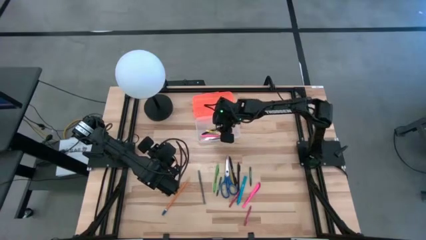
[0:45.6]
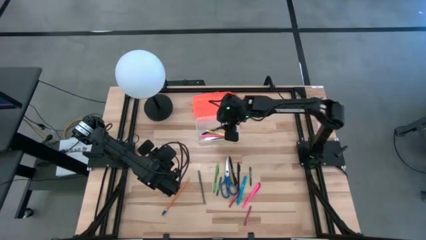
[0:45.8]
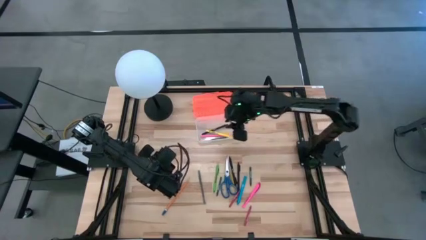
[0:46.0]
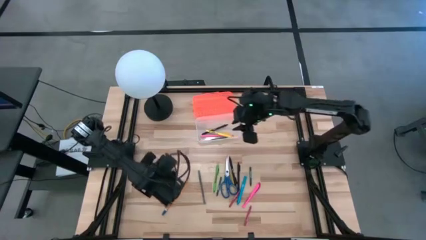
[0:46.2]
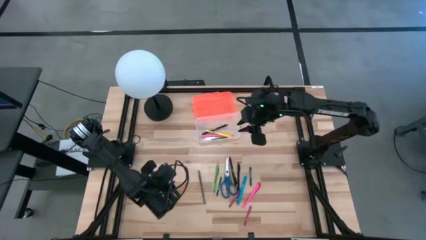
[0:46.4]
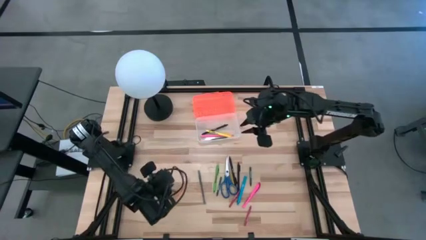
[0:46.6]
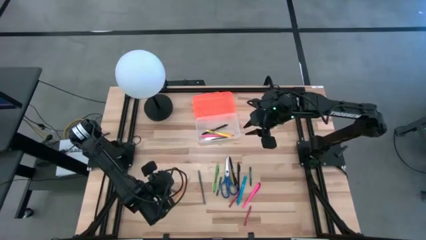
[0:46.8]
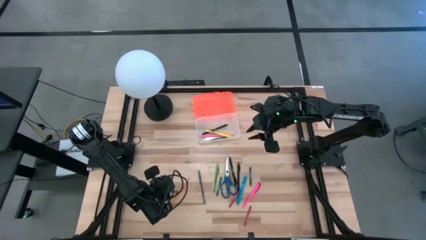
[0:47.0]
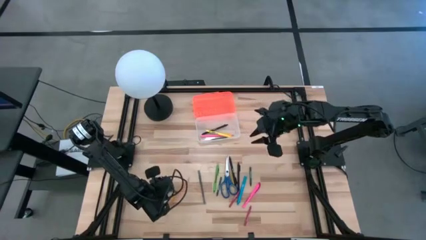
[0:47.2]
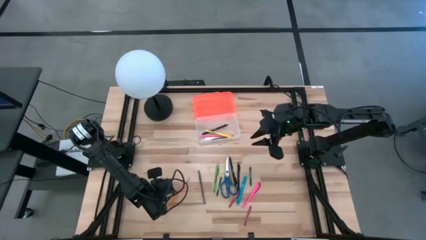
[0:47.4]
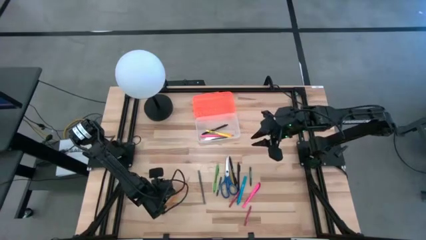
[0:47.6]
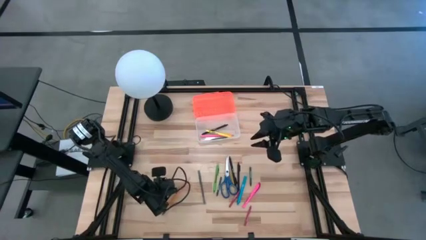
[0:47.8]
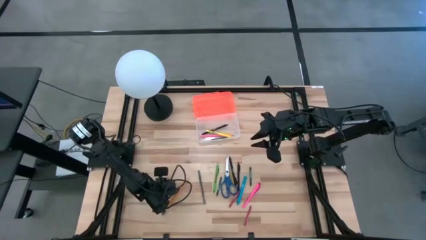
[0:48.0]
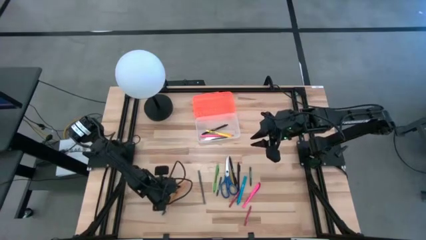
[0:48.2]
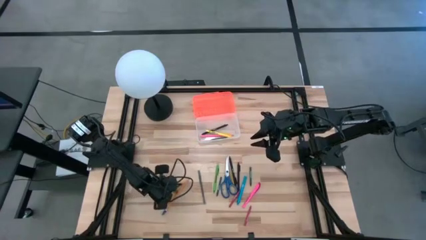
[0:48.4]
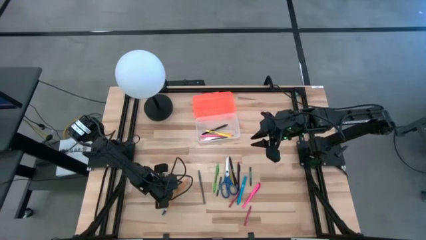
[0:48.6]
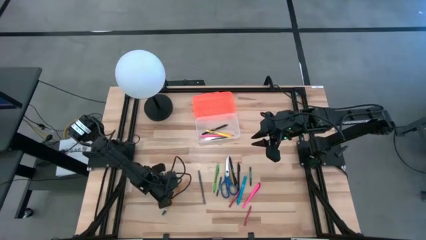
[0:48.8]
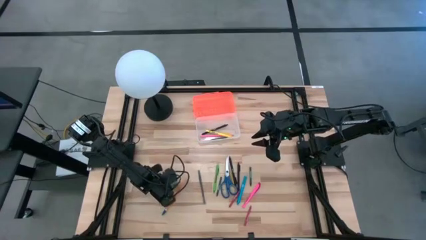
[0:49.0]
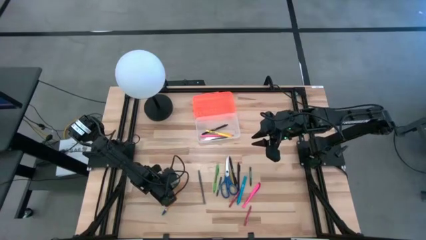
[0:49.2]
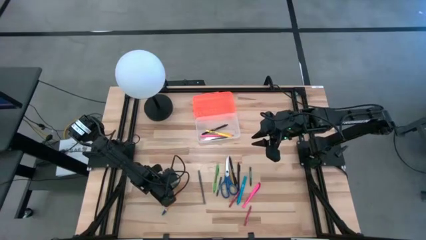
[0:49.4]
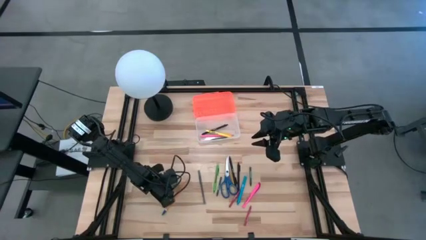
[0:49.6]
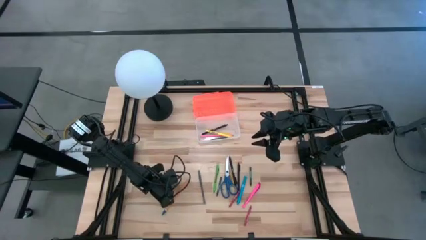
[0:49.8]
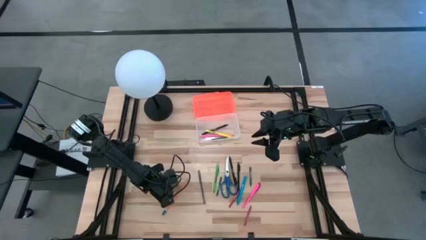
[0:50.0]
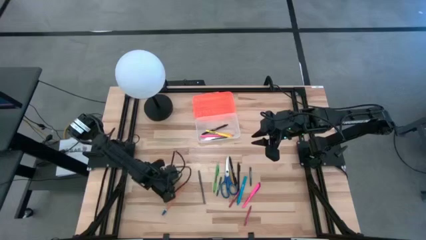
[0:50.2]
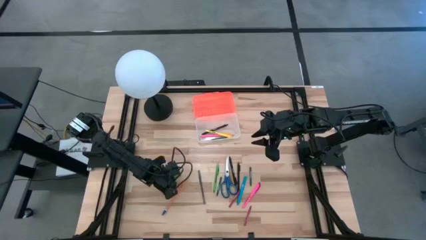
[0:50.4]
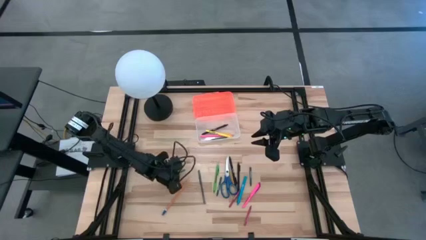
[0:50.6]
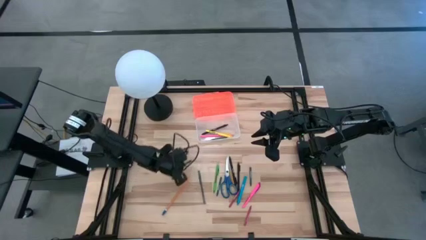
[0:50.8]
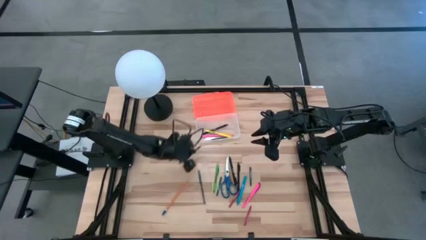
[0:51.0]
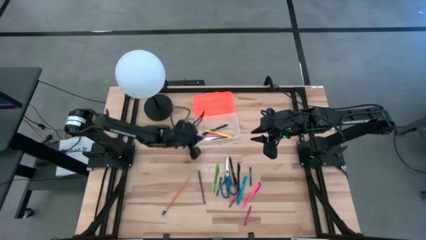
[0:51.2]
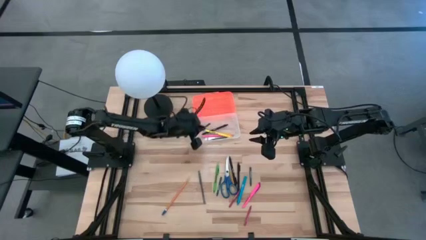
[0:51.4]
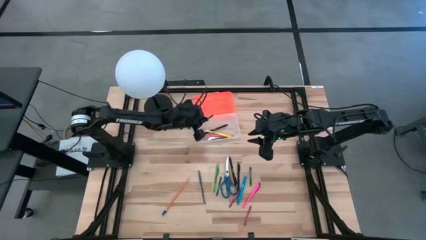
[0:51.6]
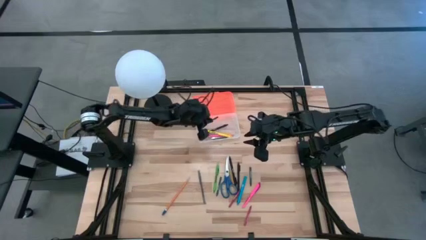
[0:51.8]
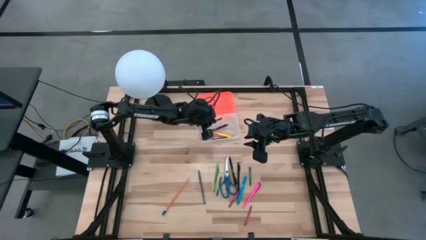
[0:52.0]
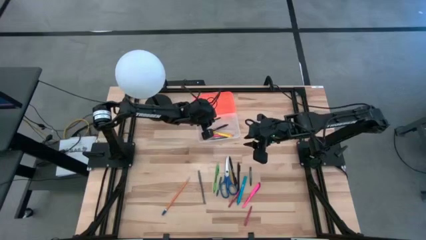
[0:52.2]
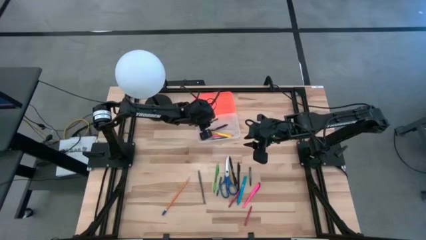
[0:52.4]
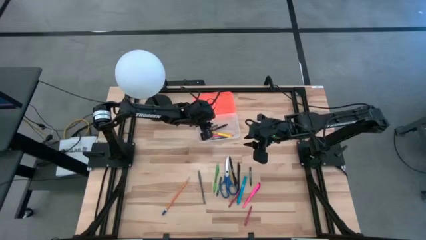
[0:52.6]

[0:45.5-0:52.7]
Task: Pick & place school supplies into a supply box
Put the green crayon into the supply box

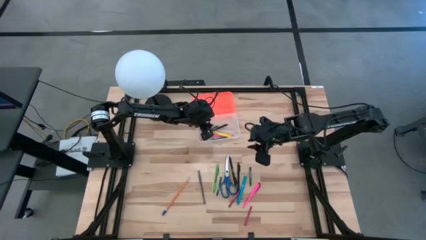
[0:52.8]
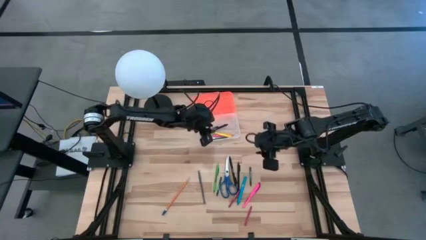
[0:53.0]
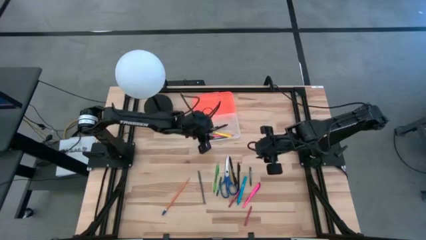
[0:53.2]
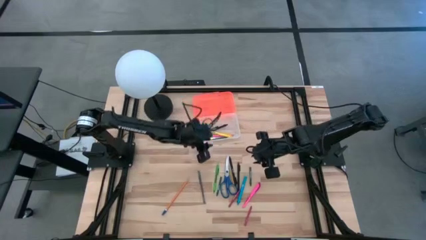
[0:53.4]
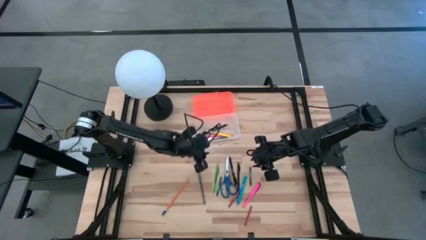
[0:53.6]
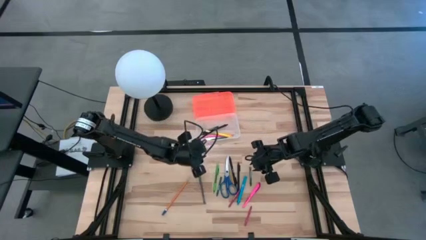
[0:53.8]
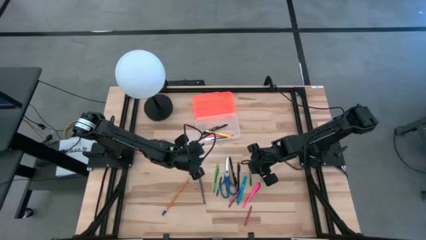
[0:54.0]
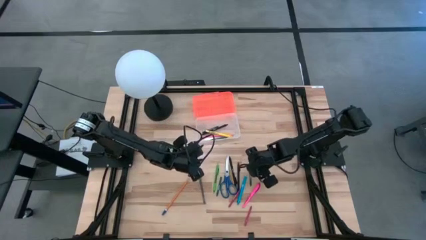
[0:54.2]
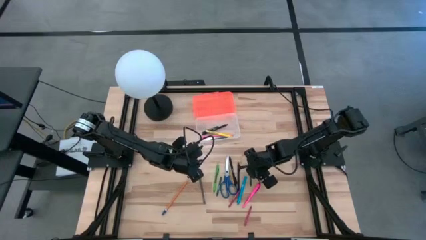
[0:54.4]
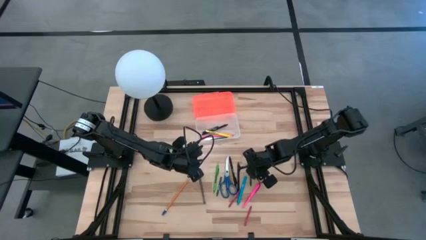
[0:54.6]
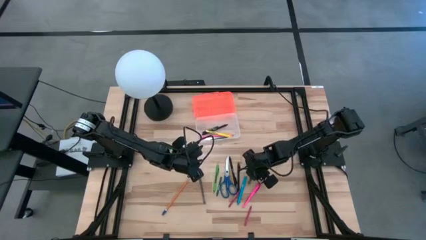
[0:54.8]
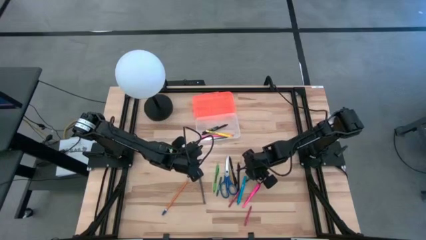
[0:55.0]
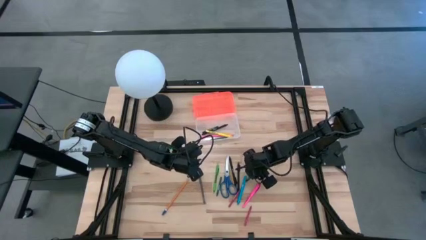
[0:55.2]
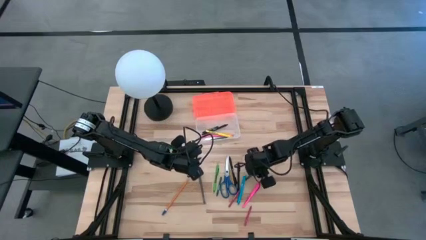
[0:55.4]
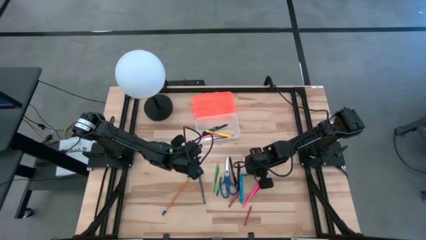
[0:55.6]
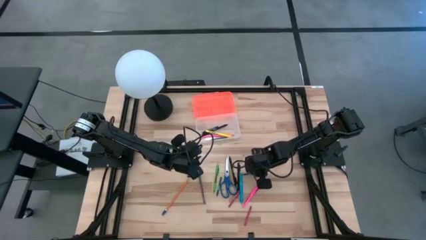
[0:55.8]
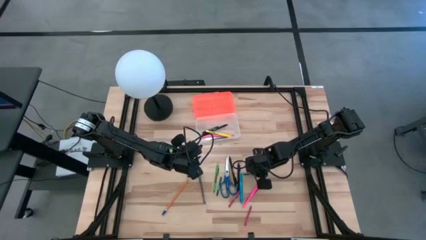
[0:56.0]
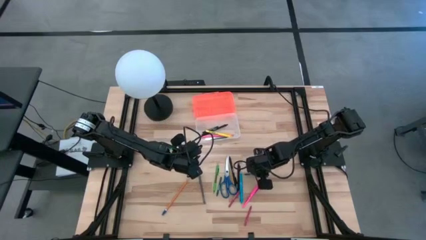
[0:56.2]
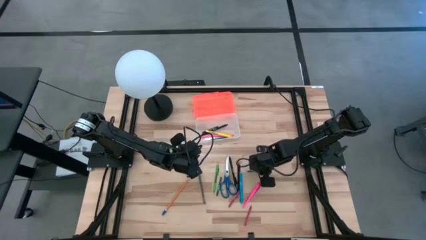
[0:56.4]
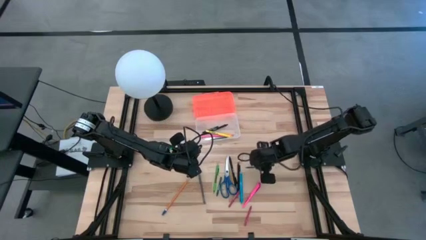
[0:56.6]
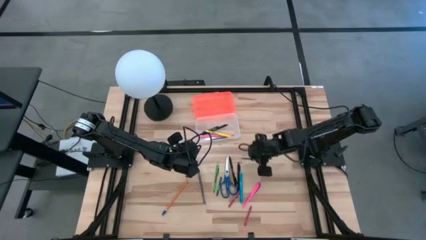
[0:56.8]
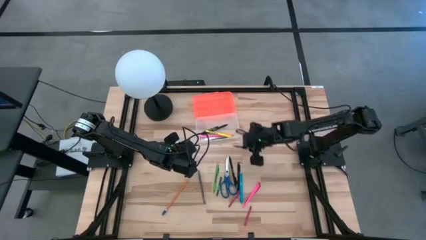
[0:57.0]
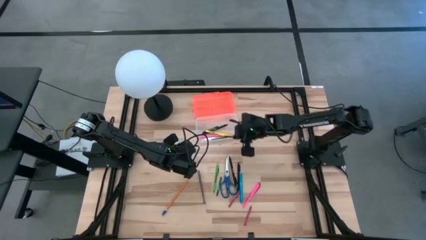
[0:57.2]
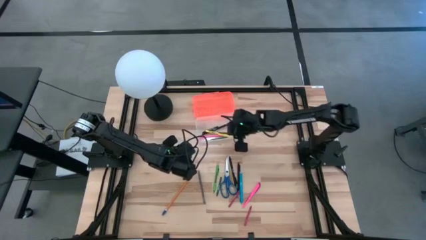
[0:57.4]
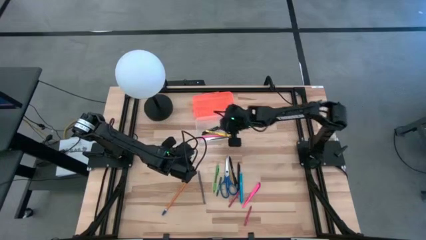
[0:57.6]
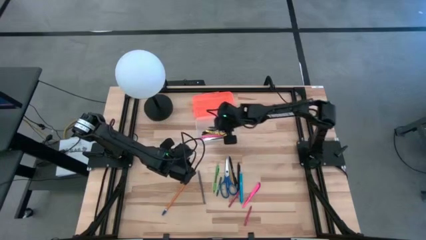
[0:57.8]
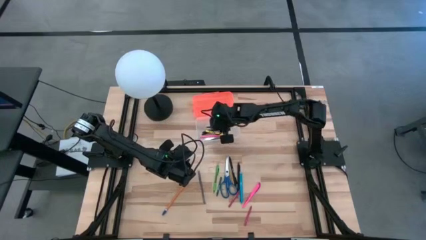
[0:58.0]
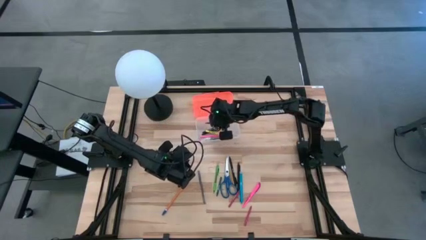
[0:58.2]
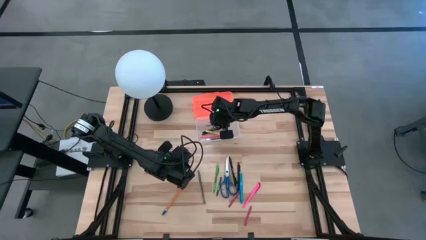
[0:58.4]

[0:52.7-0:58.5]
Put the green crayon into the supply box
